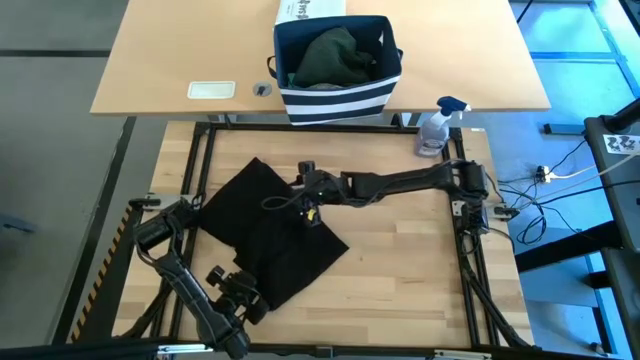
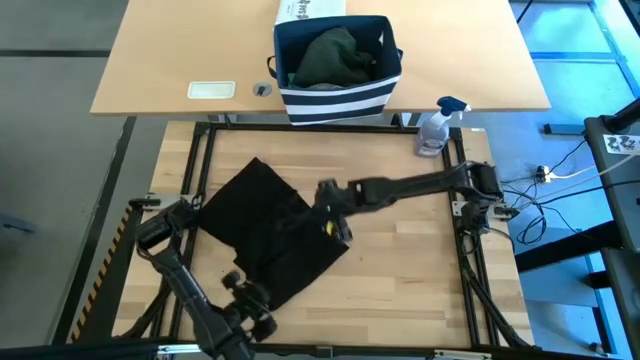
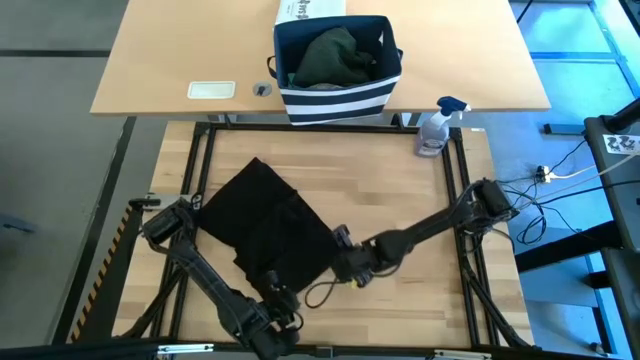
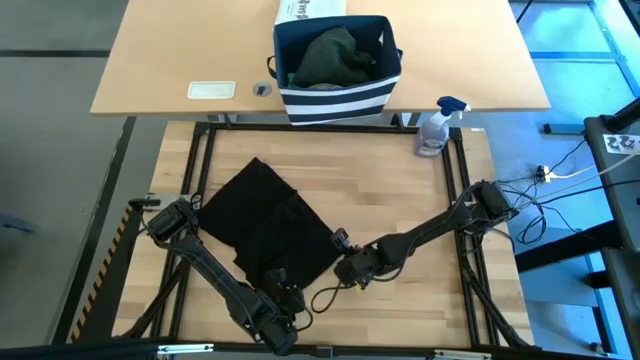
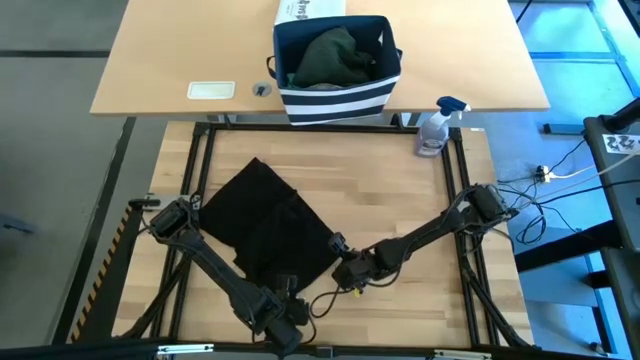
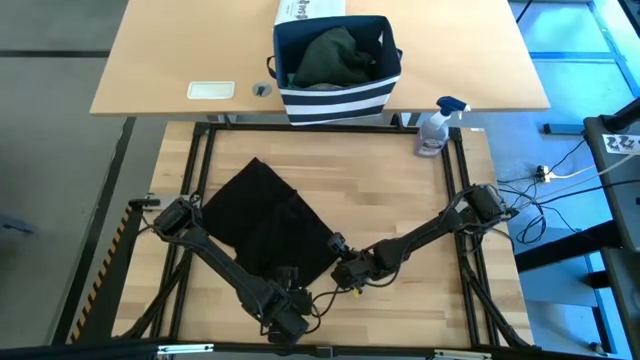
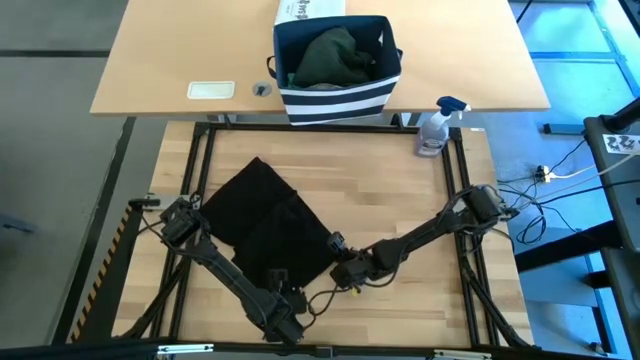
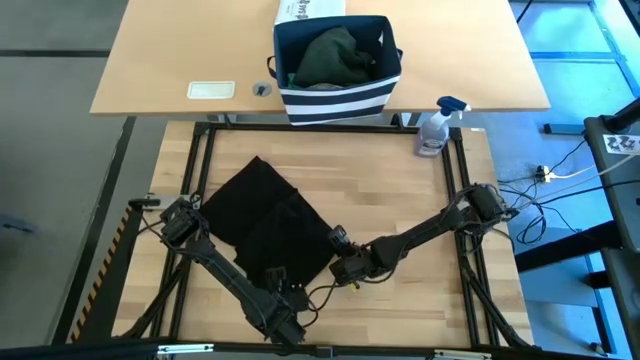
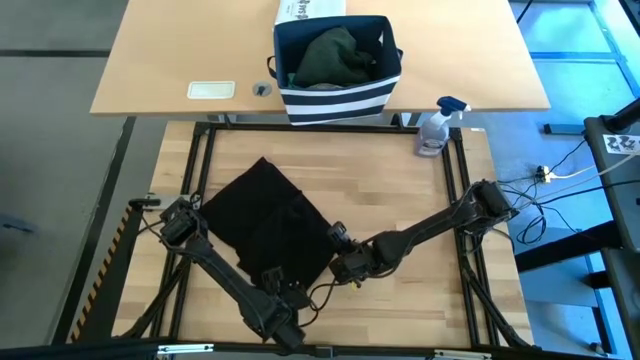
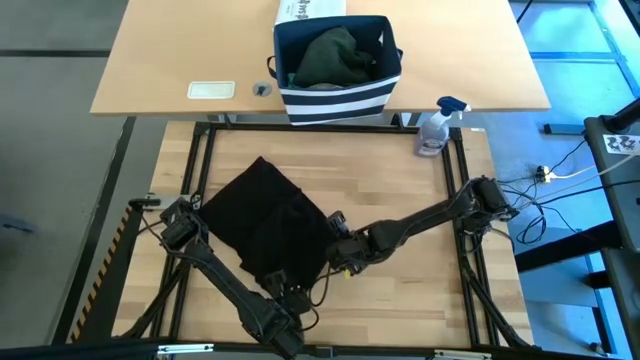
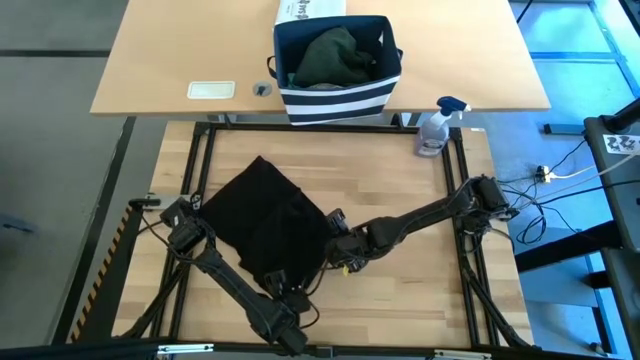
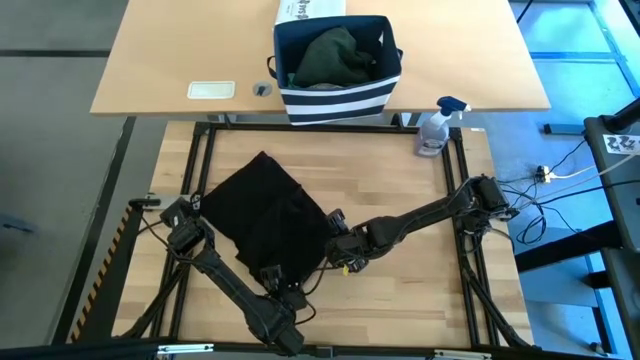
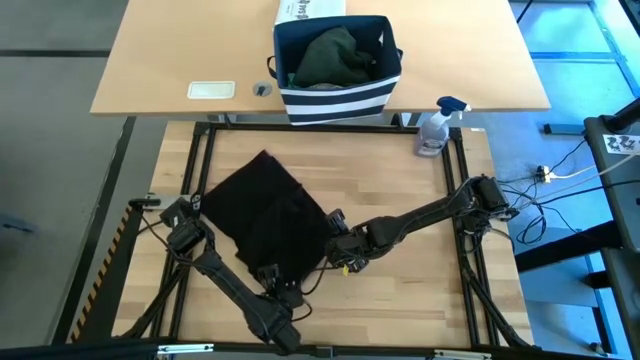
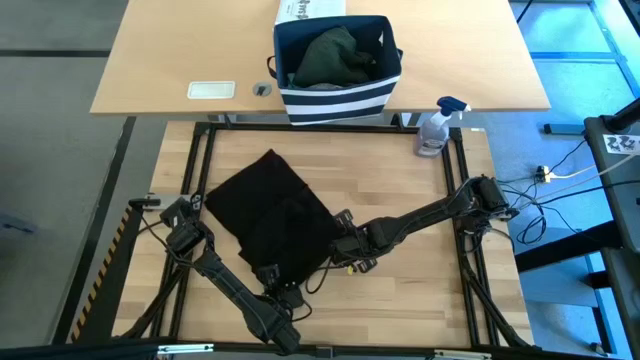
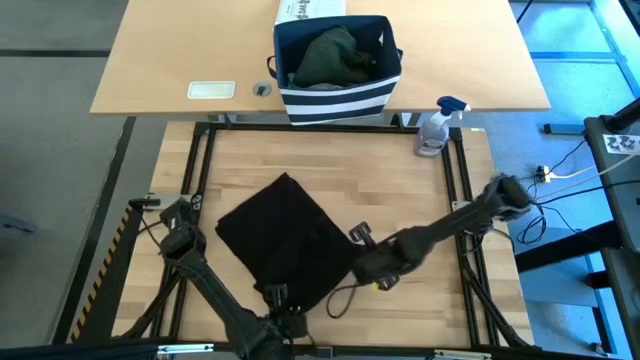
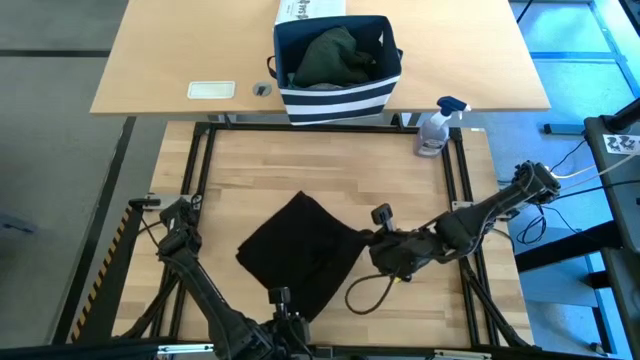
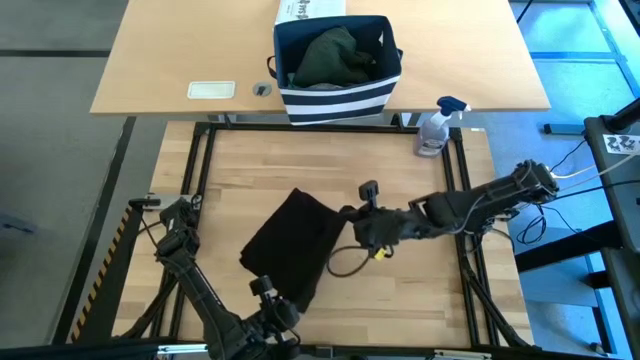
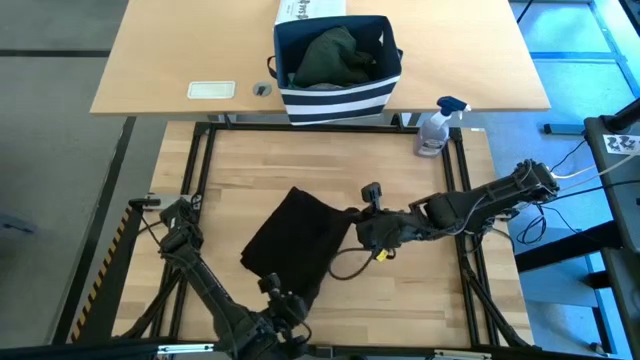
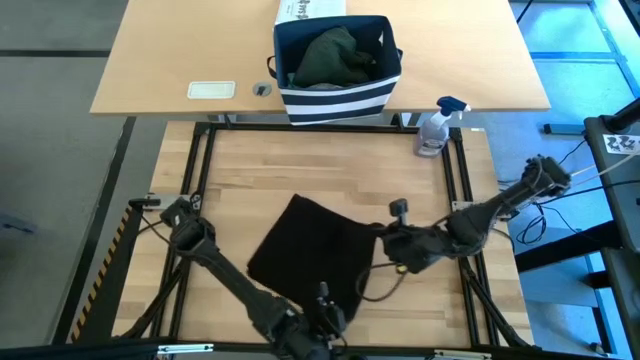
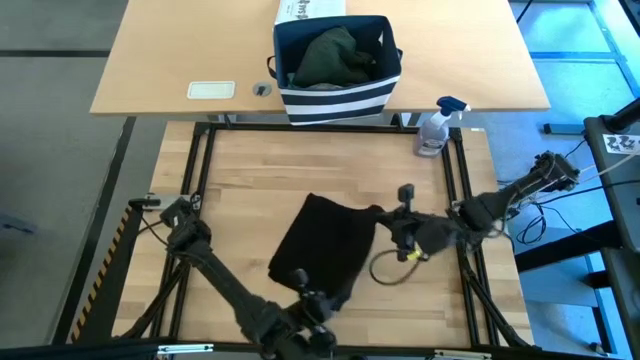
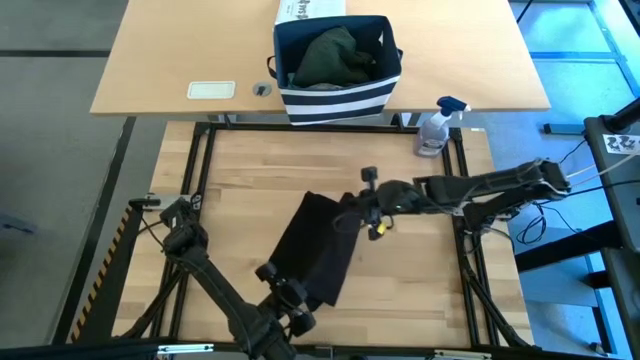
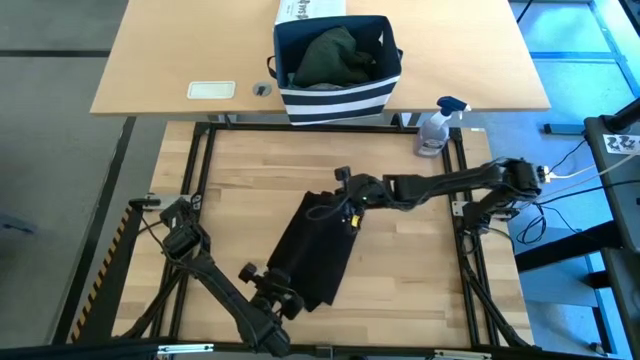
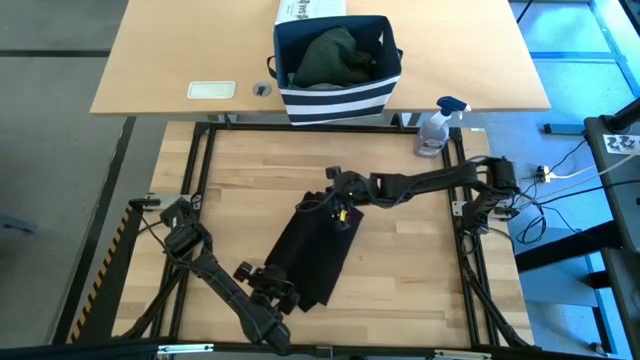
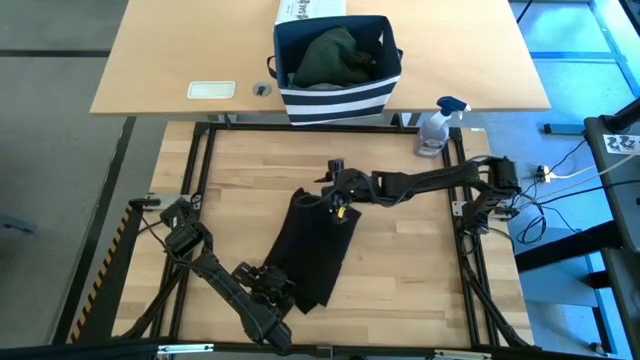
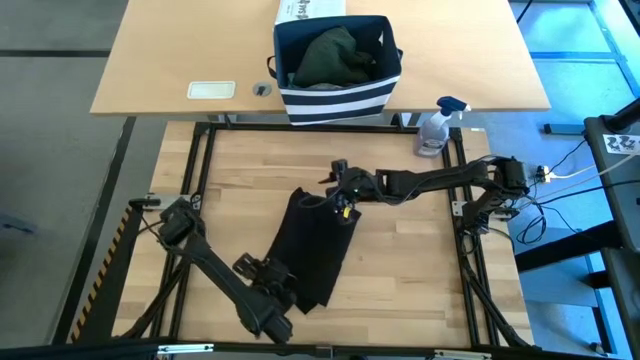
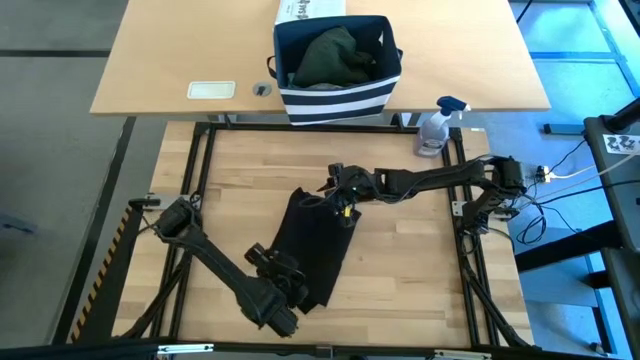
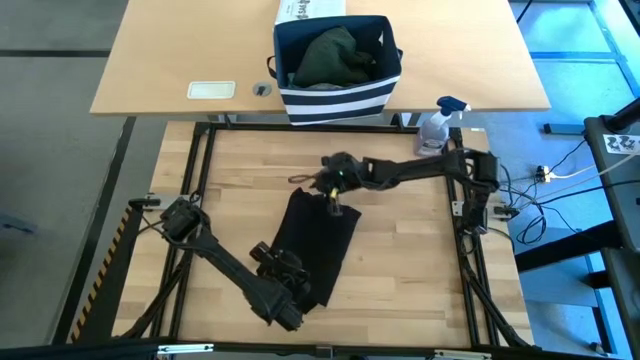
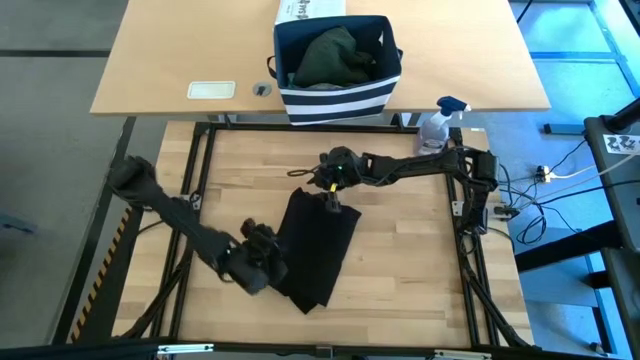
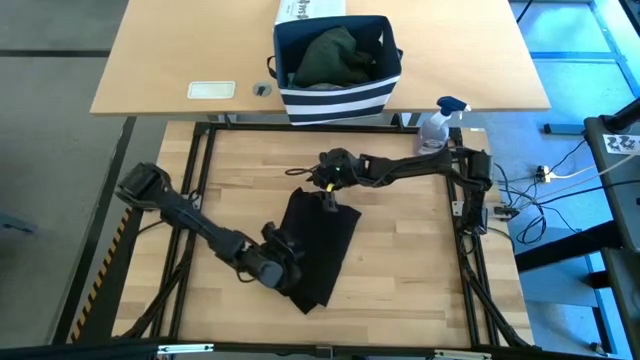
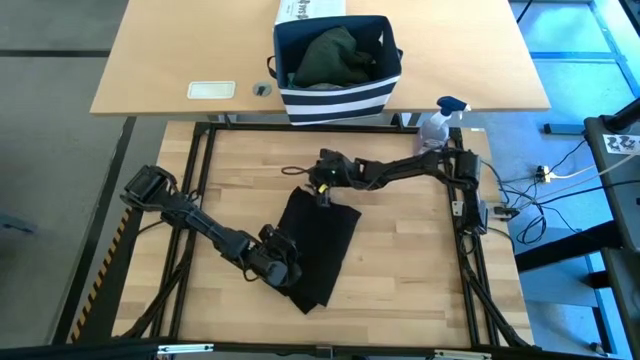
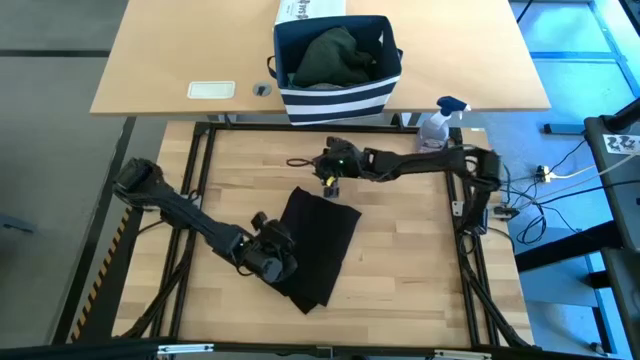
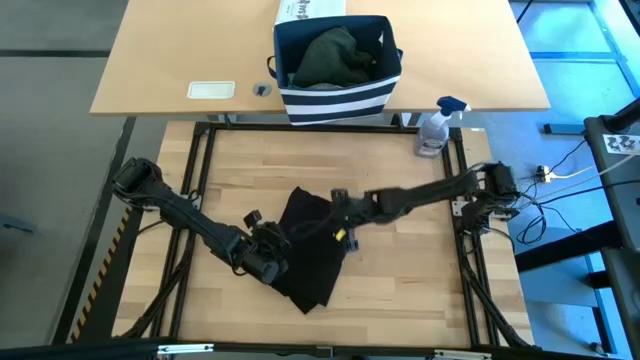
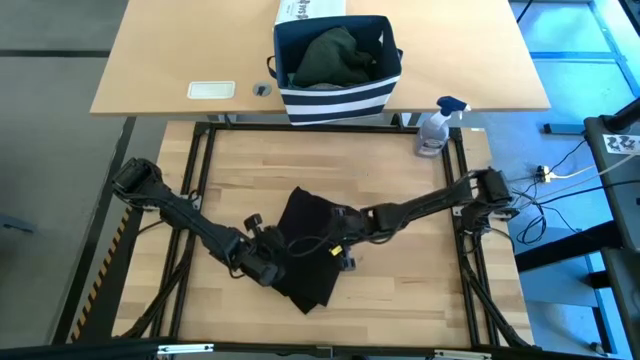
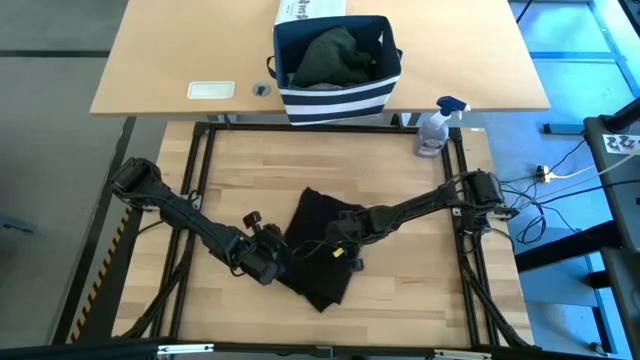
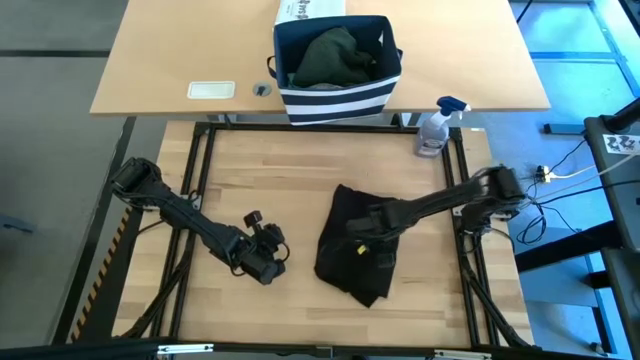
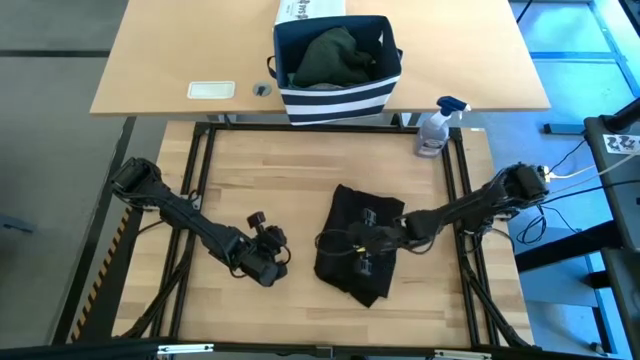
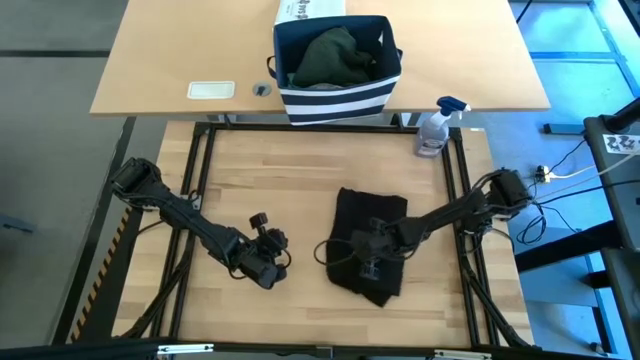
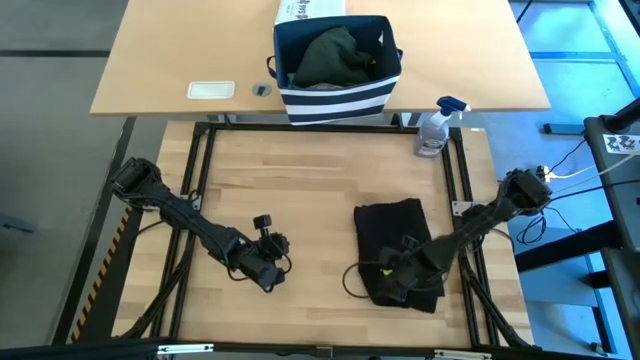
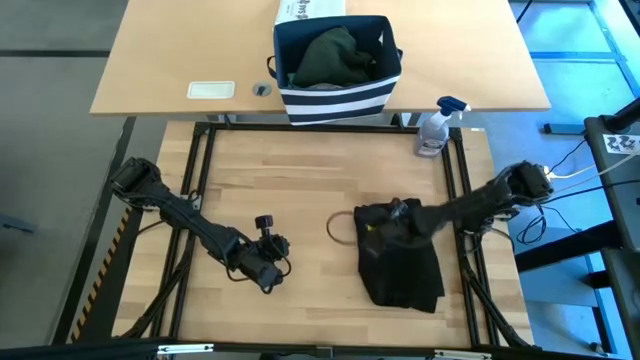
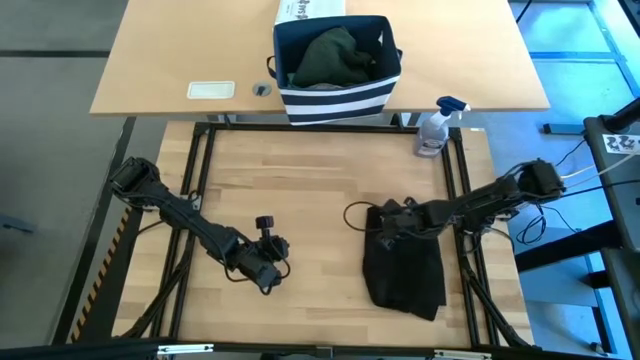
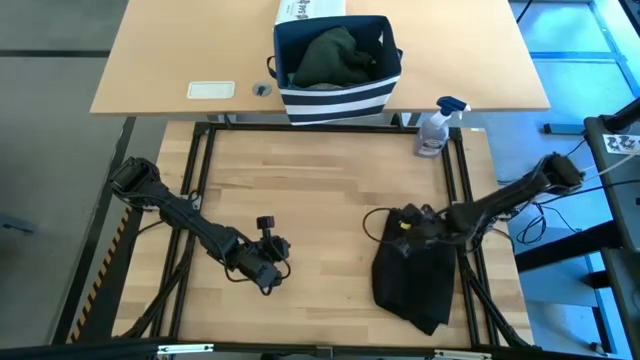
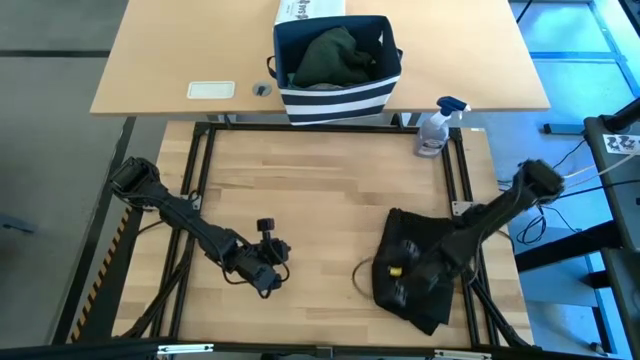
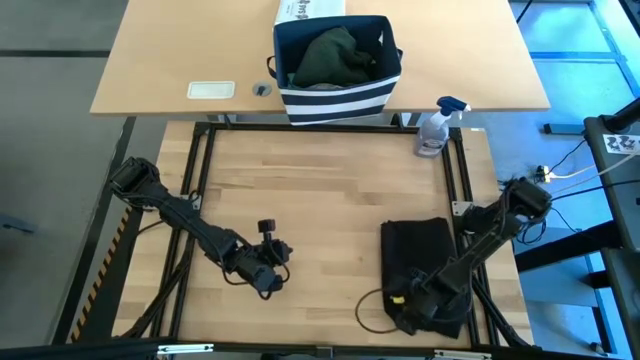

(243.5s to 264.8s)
Task: Fold Laundry from Bin
Fold the black shirt
